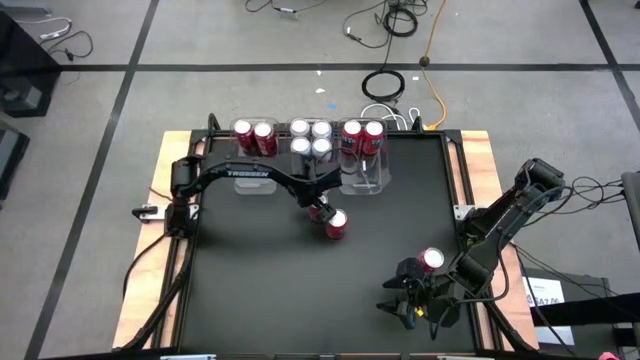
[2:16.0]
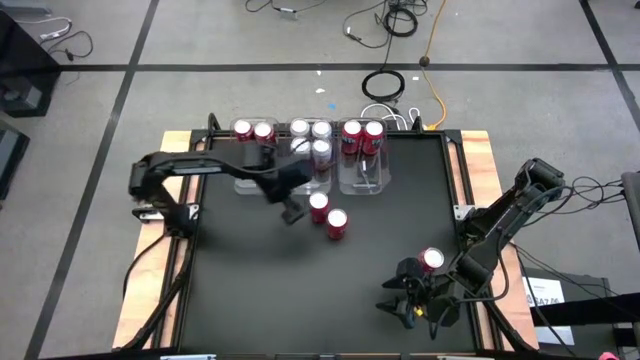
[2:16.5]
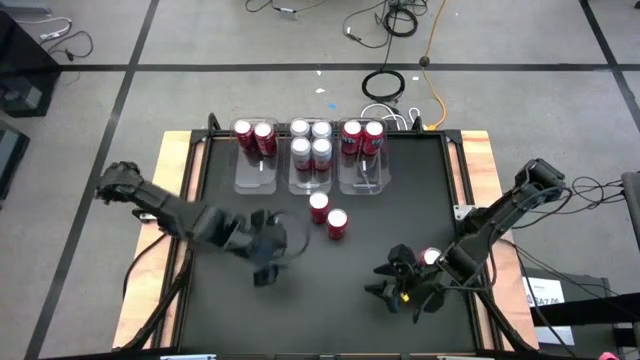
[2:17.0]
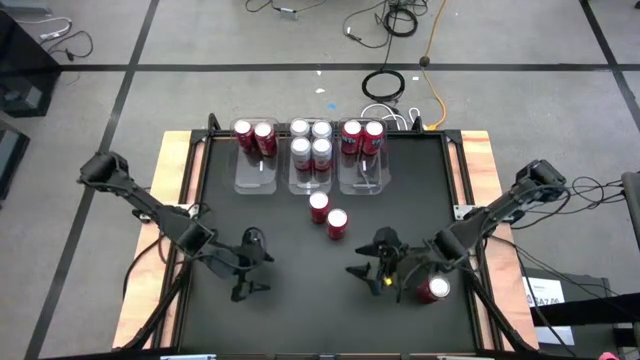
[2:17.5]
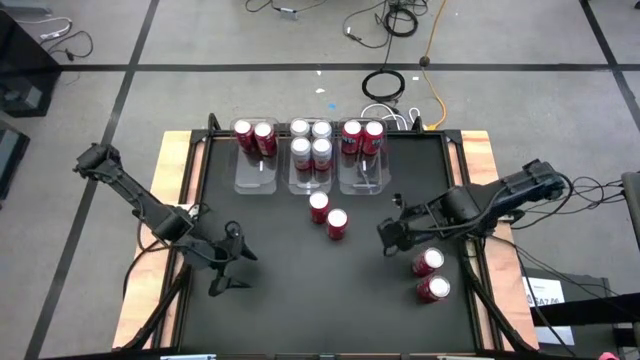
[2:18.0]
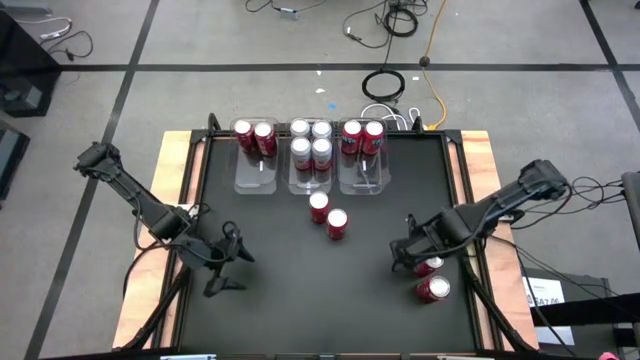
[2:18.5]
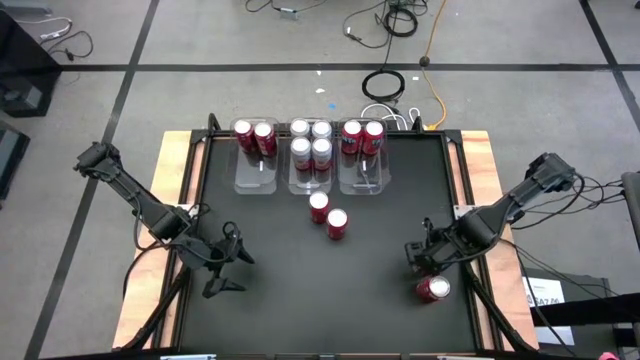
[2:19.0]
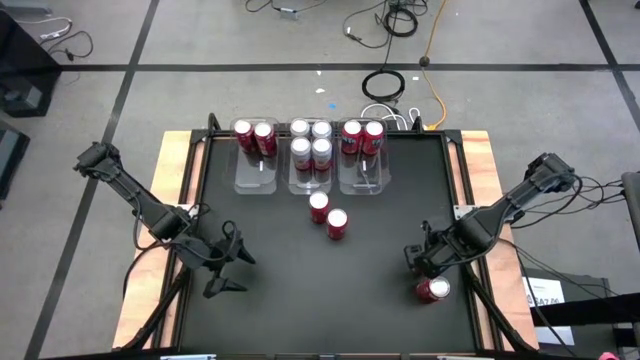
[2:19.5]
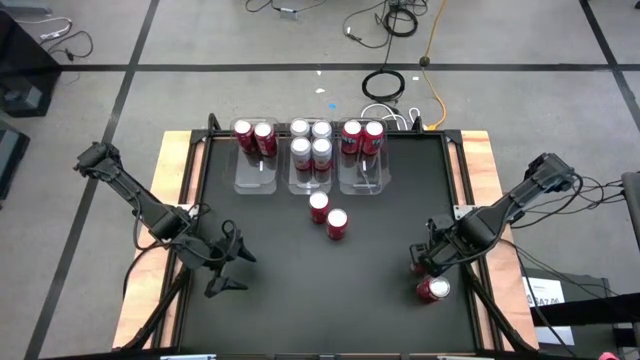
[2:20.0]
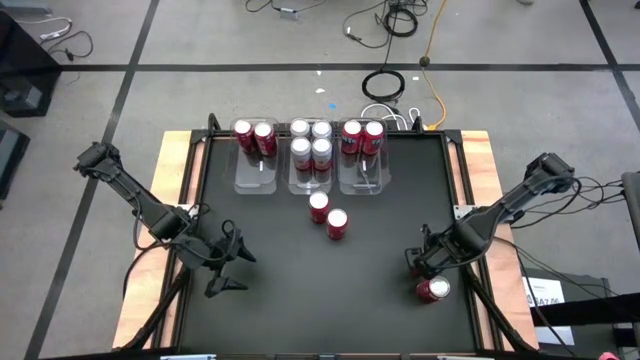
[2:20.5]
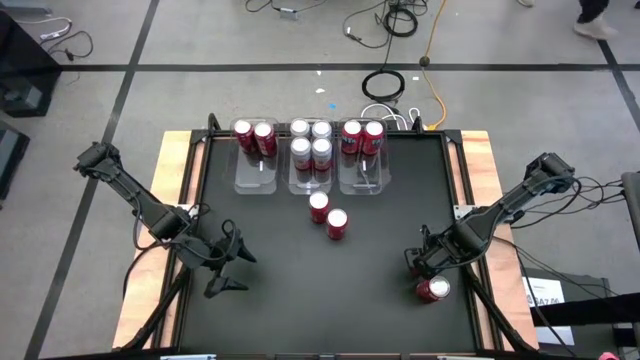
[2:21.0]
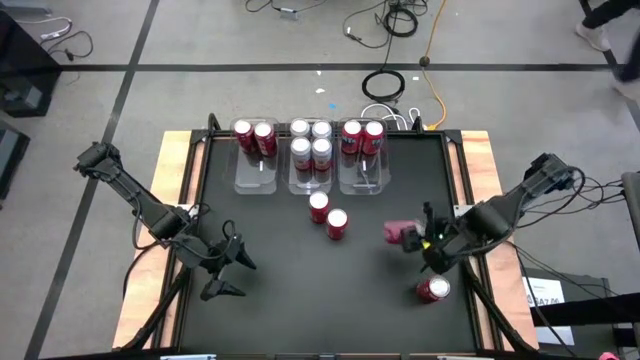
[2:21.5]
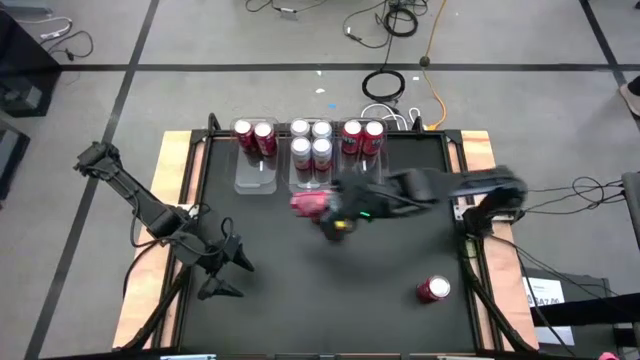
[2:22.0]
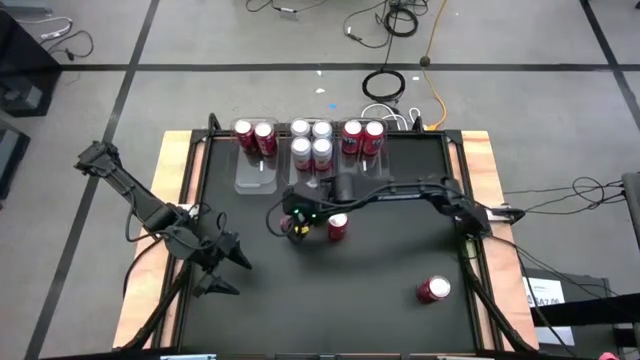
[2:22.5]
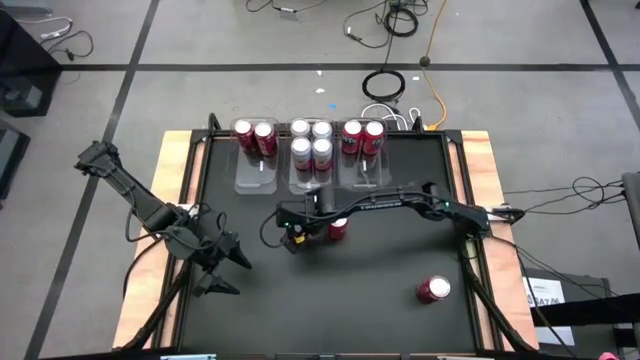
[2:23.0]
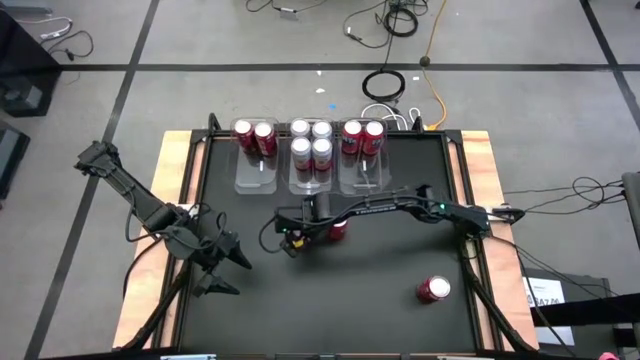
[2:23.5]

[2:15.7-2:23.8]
Task: Sort soda cans
Move the top red soda can to the center of the table

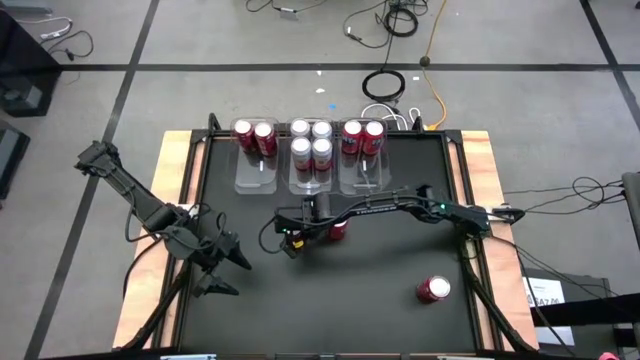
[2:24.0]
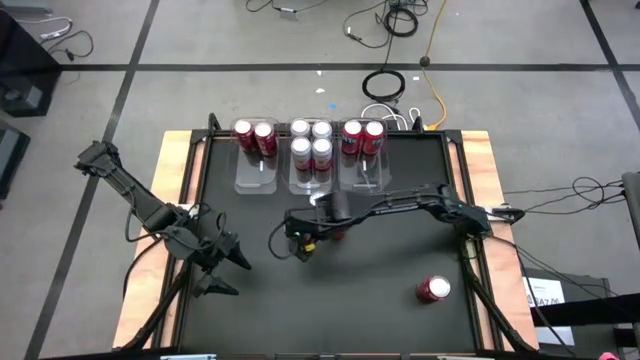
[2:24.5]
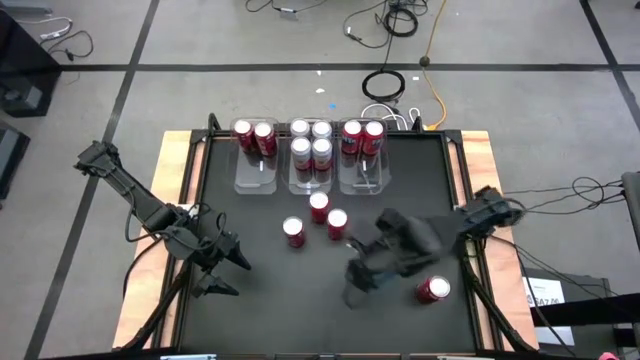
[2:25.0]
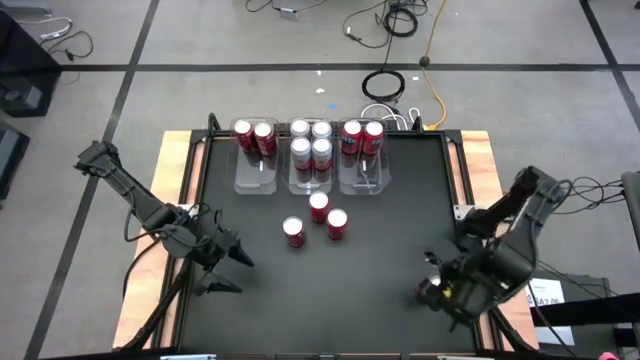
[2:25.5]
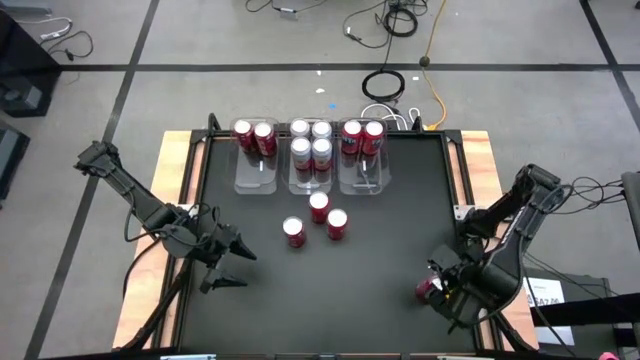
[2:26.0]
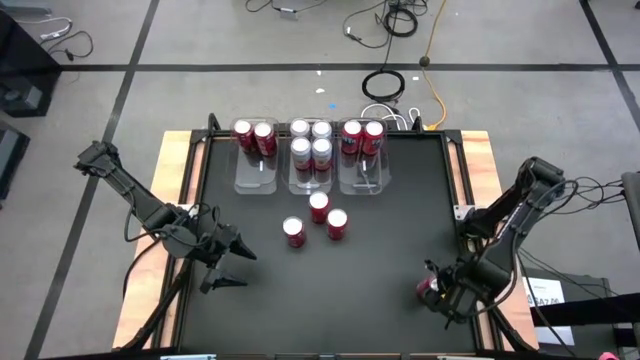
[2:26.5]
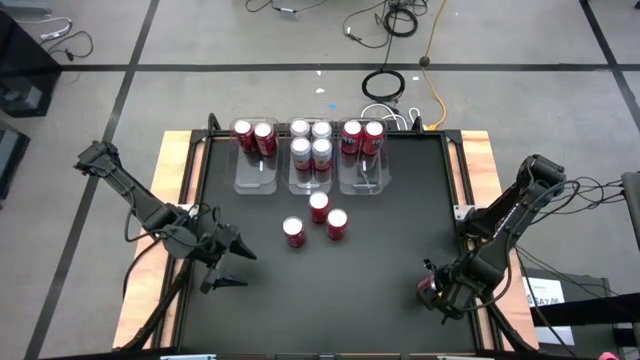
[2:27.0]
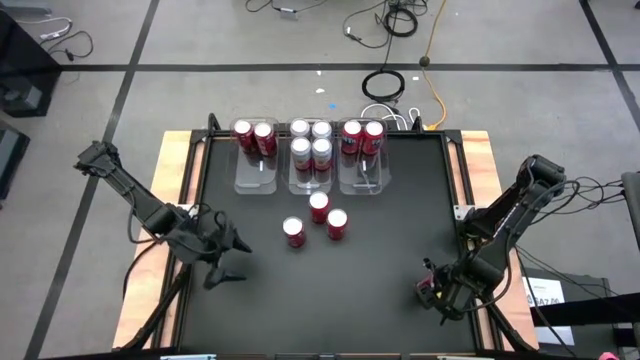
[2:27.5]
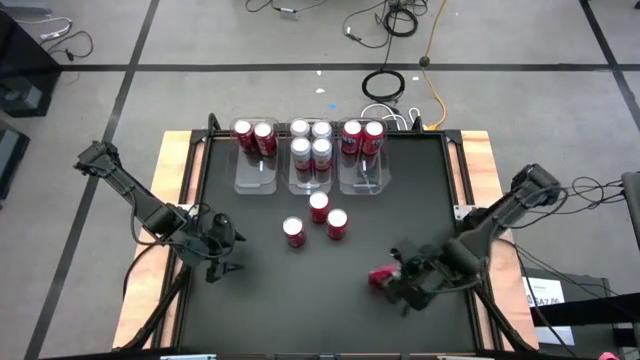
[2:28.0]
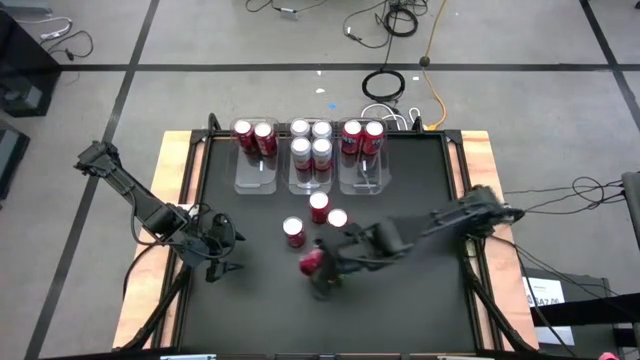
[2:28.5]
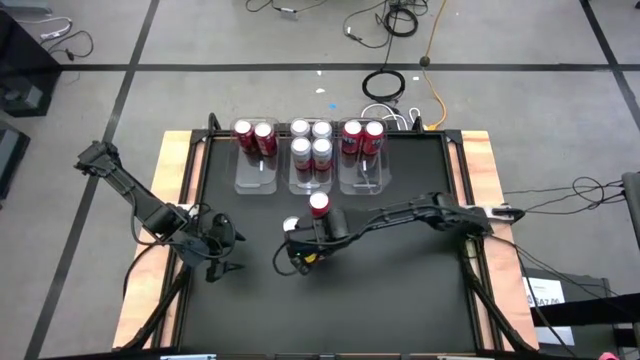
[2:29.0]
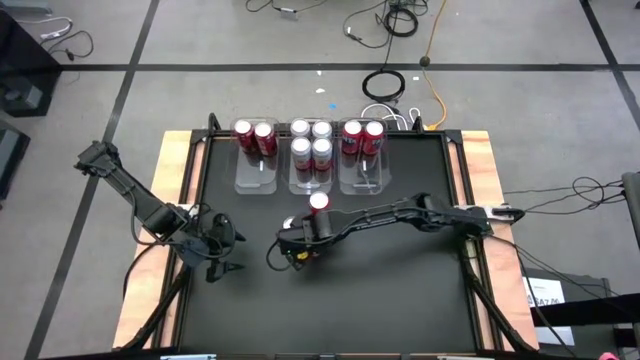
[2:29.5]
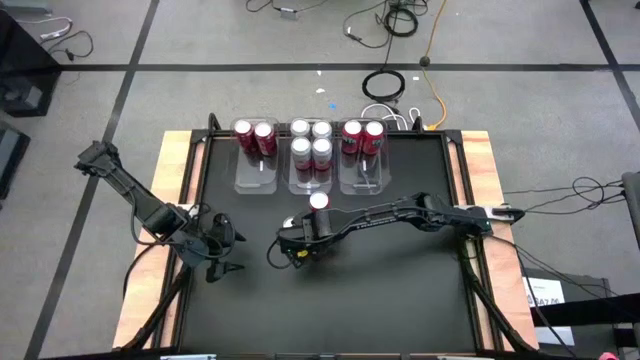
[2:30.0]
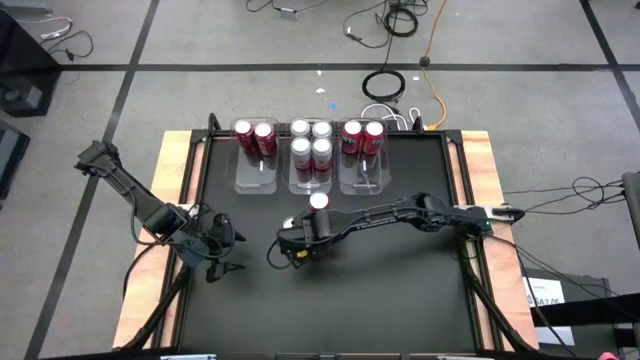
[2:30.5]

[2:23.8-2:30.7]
Move the bottom red soda can to the center of the table

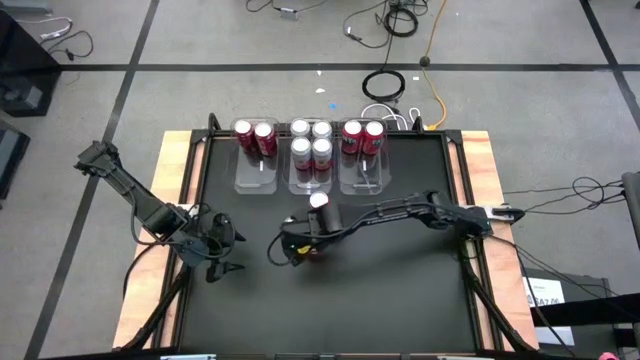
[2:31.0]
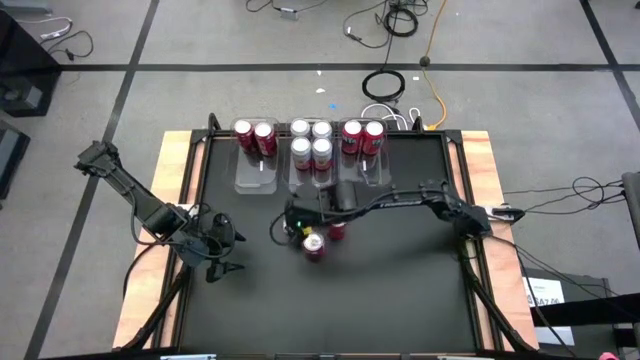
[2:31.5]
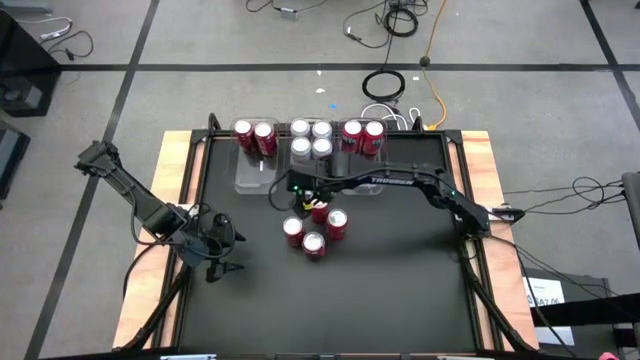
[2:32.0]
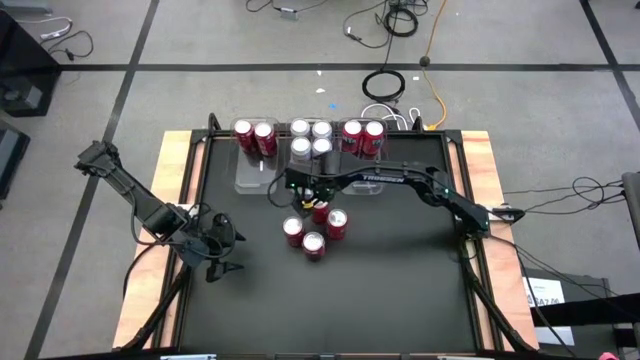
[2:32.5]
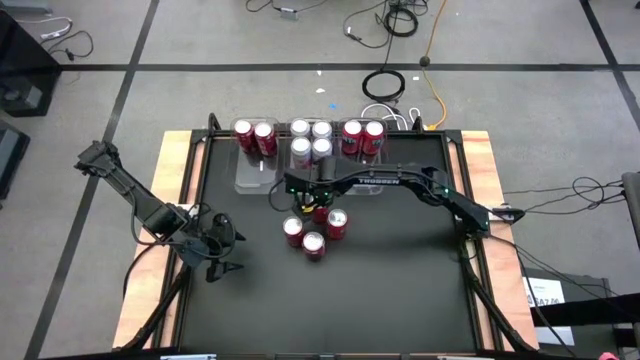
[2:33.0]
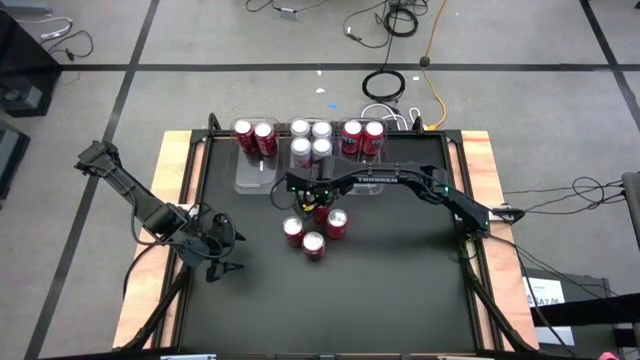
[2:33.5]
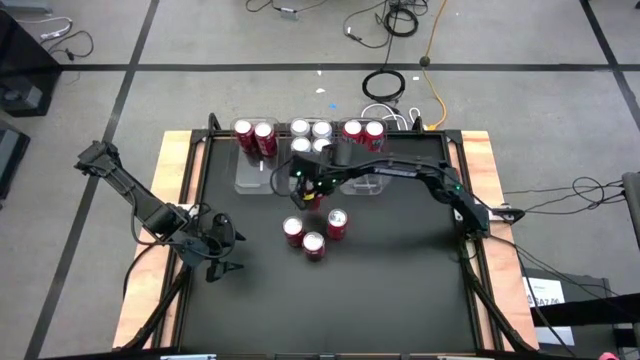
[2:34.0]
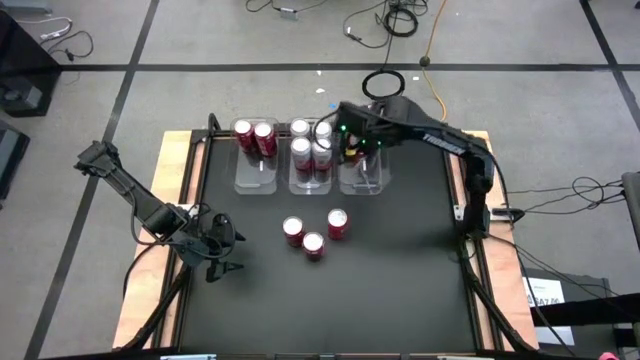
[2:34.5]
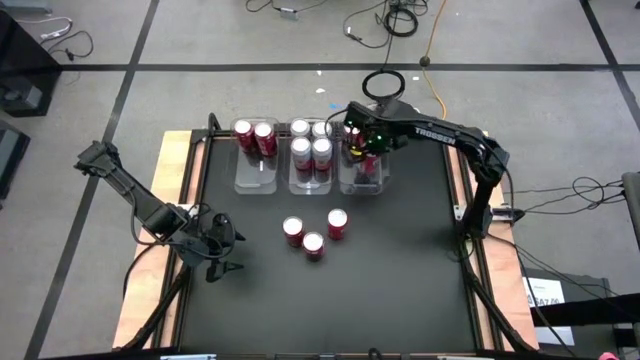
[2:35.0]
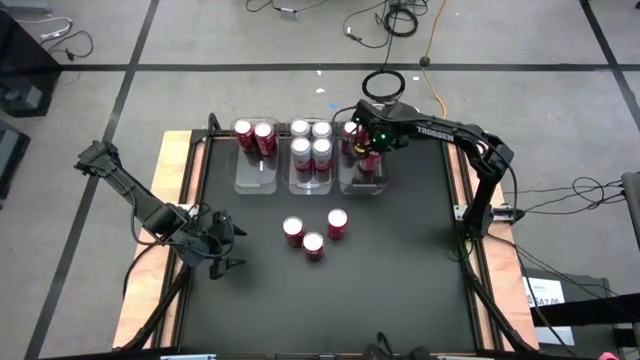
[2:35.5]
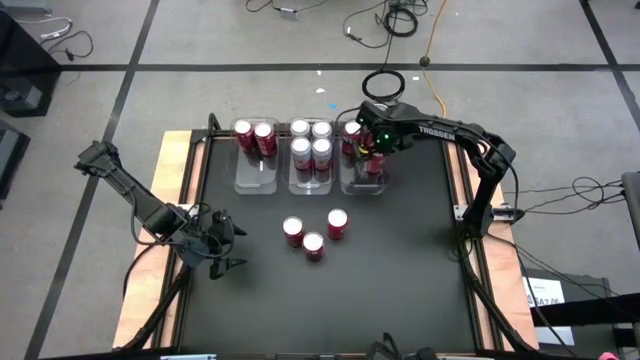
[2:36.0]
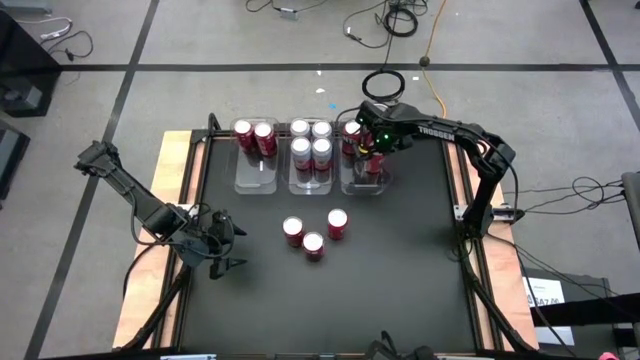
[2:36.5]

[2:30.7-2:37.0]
Put the top orange soda can into the right transparent bin
